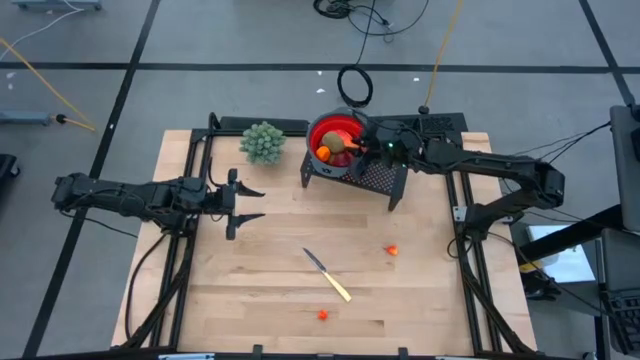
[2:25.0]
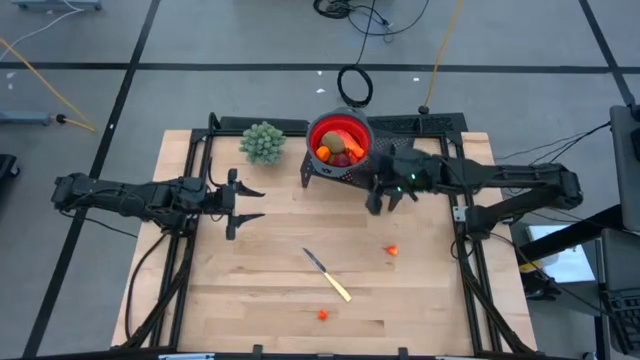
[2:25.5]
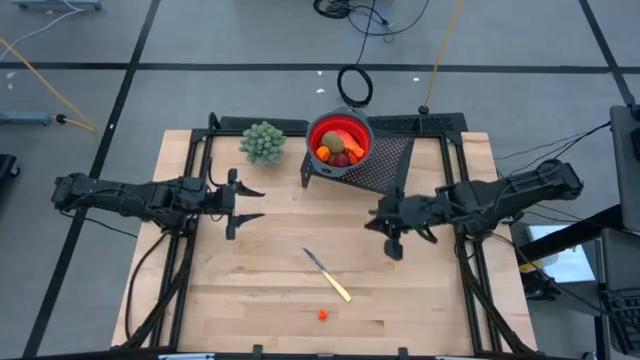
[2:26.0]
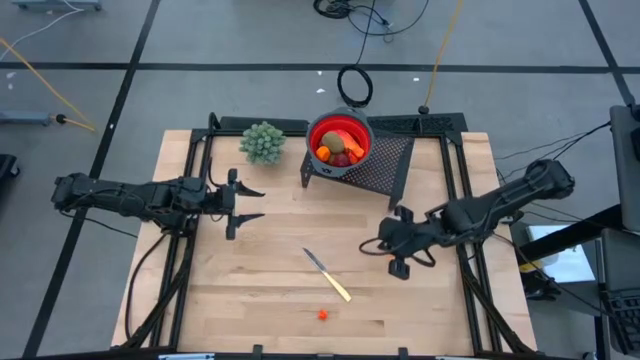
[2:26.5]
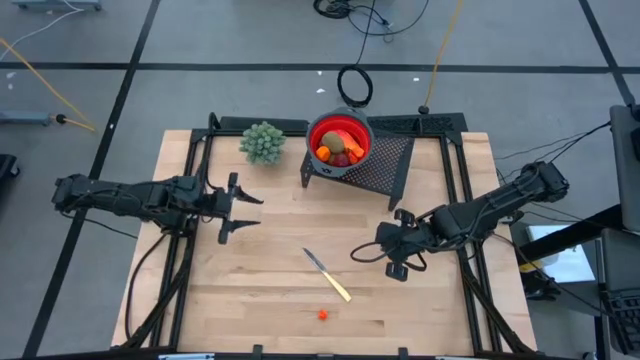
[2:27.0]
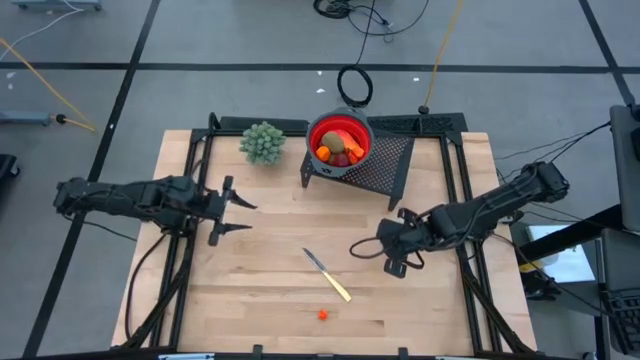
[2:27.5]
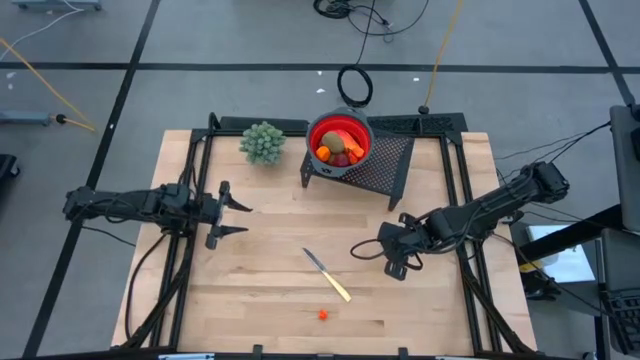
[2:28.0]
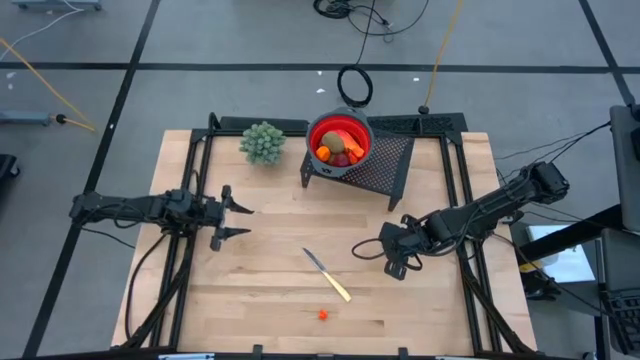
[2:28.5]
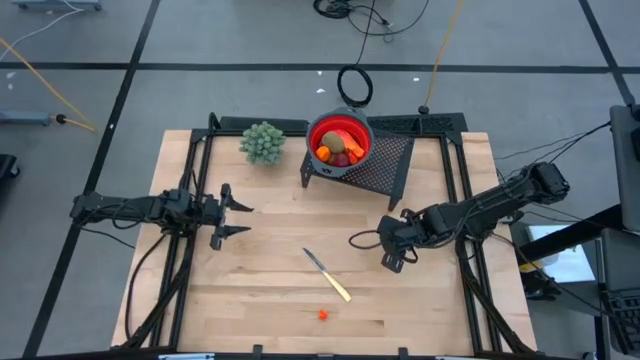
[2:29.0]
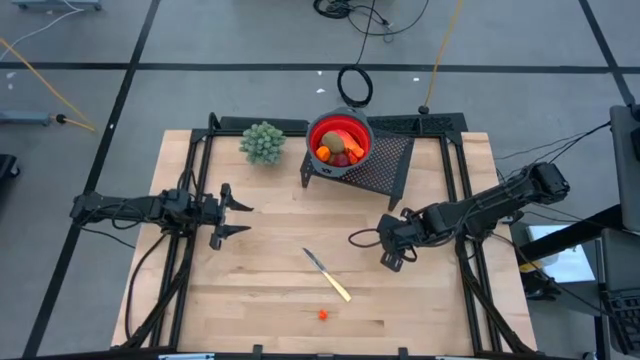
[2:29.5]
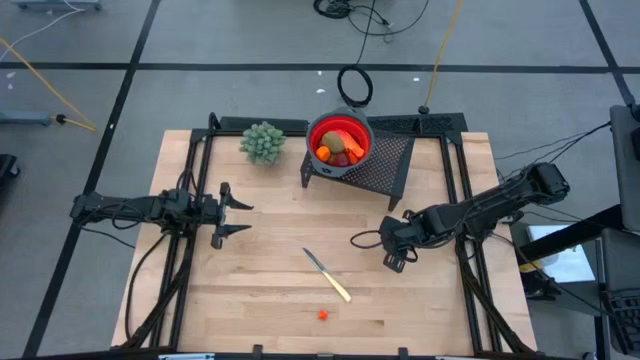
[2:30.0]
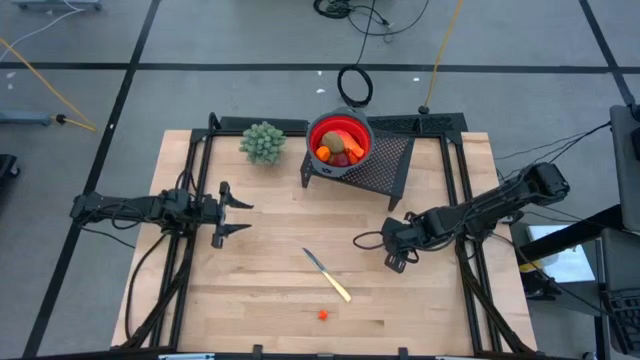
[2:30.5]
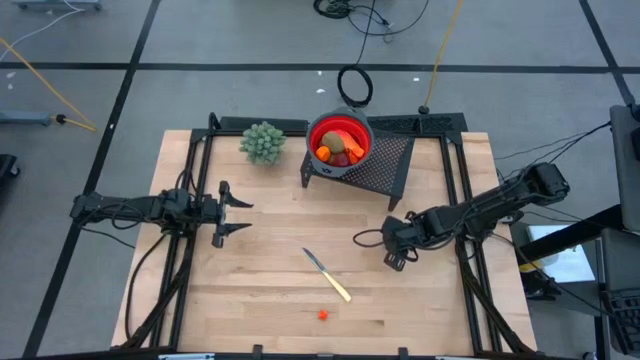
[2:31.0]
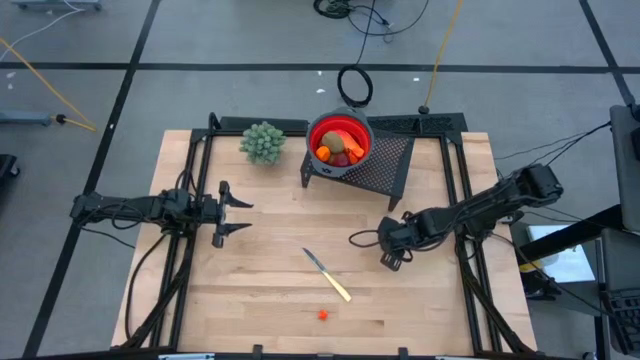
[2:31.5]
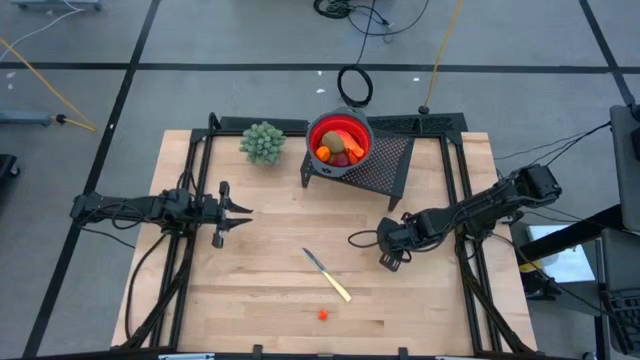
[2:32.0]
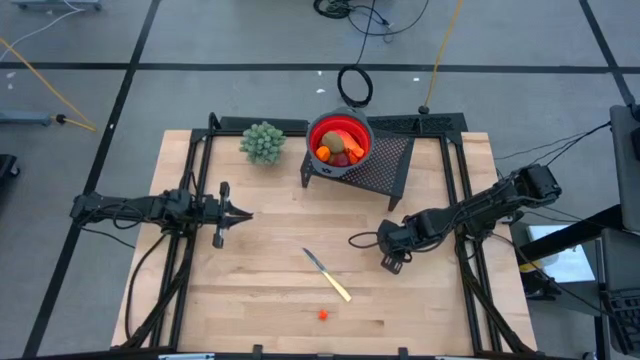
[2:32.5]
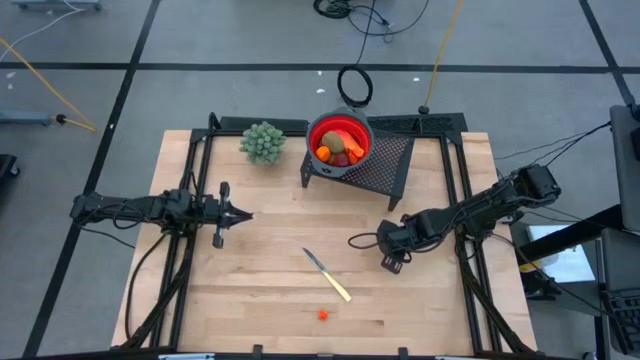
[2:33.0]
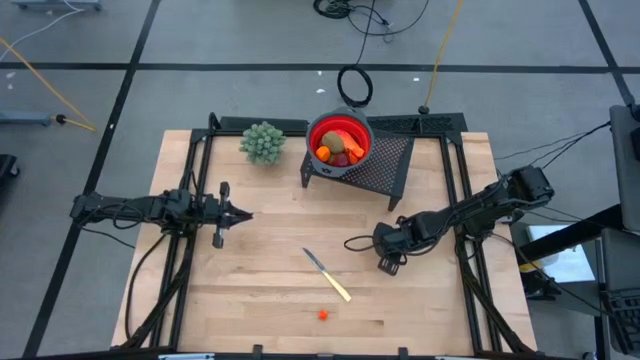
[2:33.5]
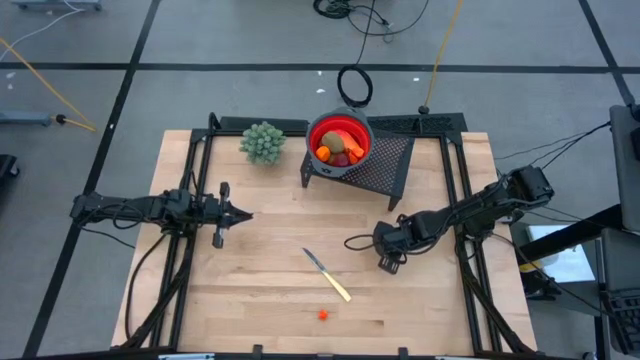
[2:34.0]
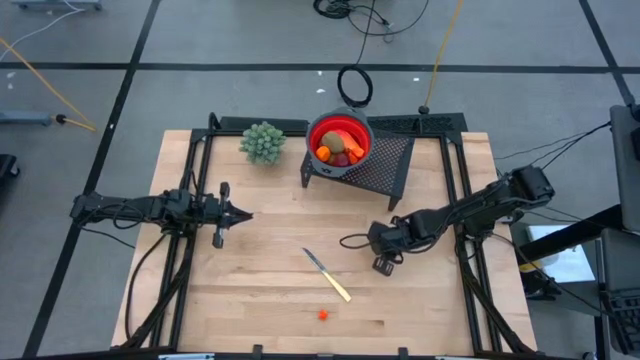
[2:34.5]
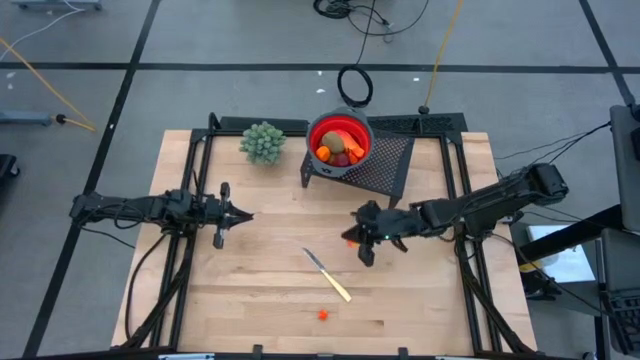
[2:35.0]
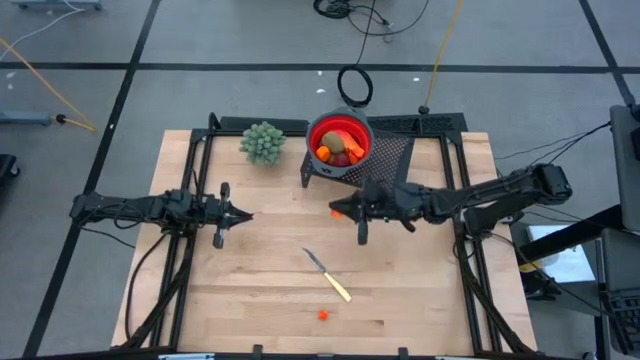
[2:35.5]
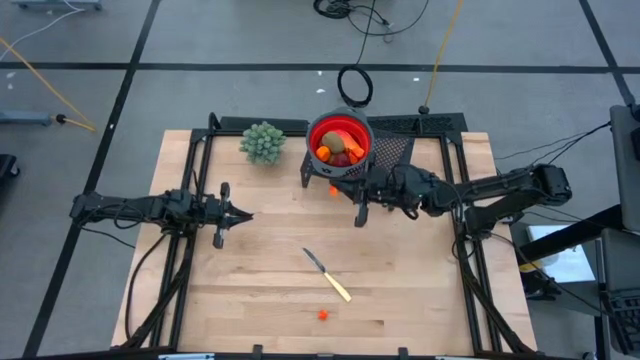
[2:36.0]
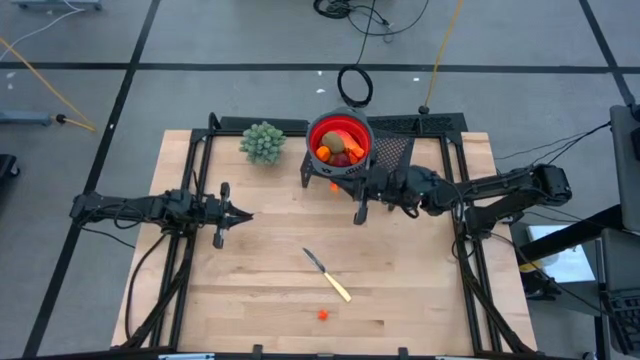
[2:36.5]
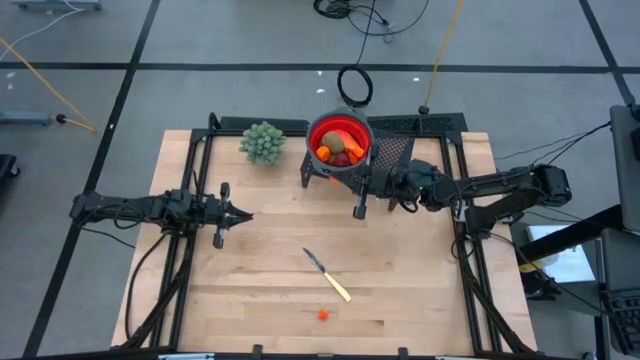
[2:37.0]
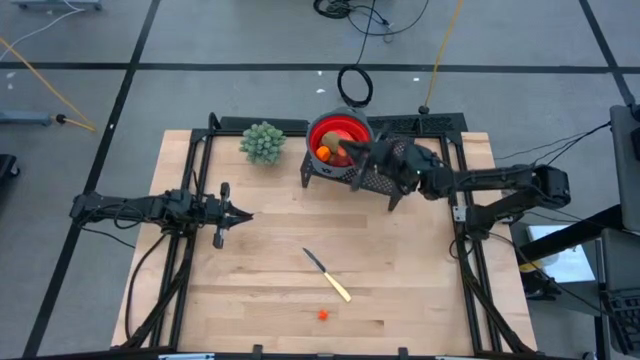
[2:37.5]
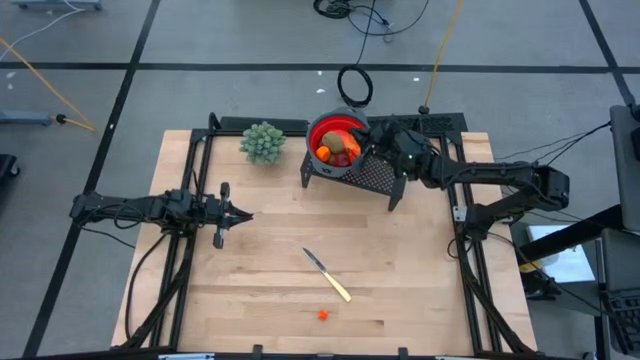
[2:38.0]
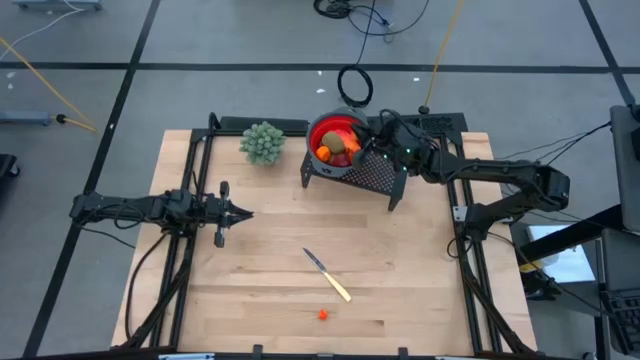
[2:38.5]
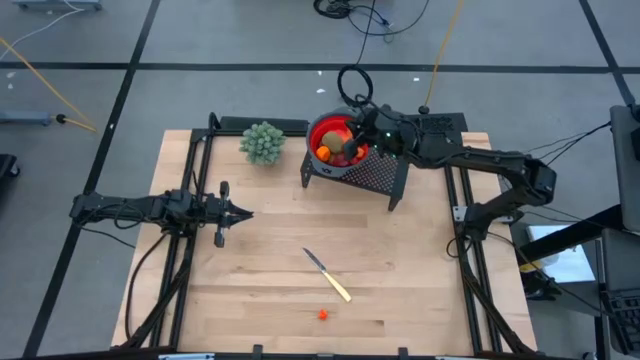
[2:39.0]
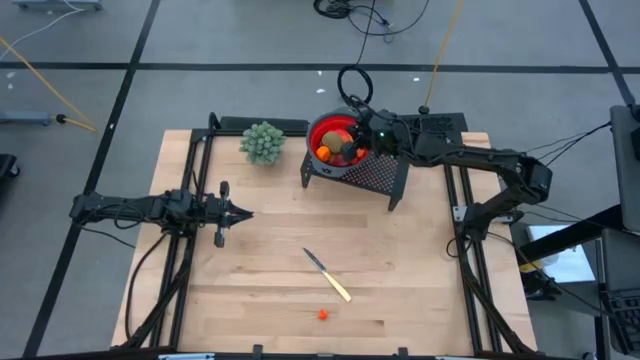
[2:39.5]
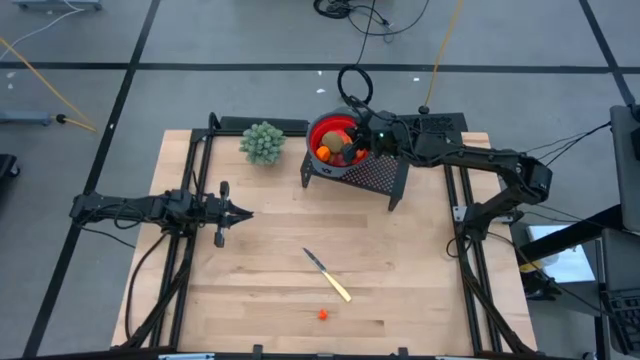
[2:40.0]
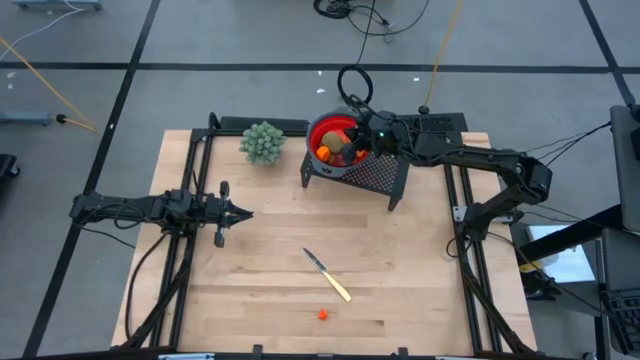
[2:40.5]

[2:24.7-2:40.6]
Task: Pick & Place Fruit
Put the yellow pear into the red strainer bowl on the shelf

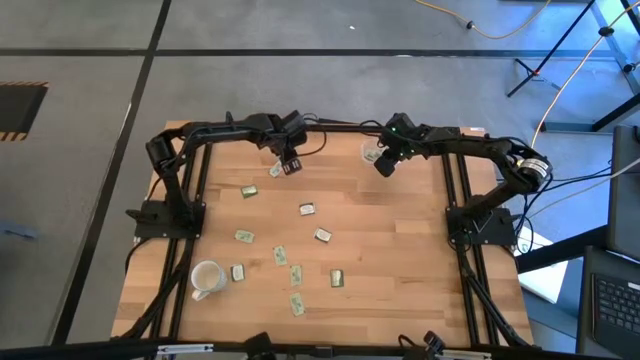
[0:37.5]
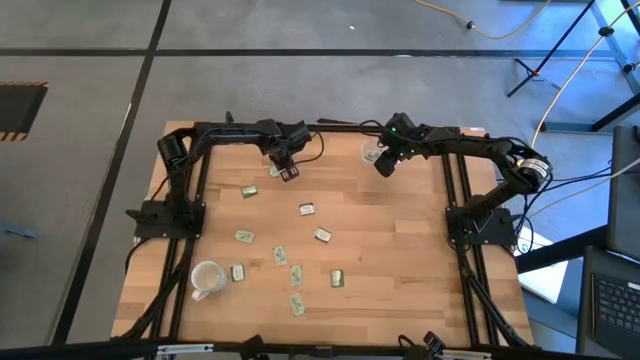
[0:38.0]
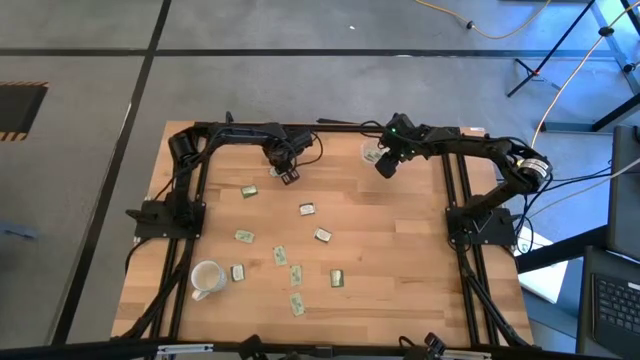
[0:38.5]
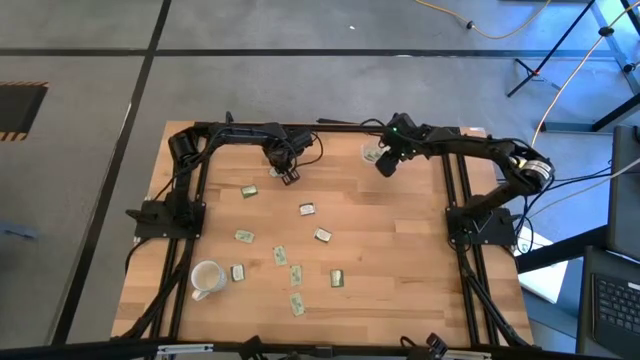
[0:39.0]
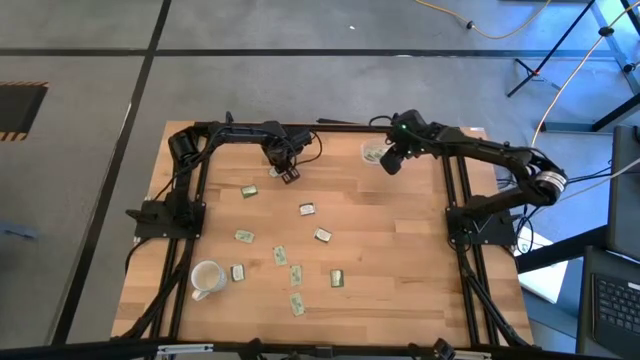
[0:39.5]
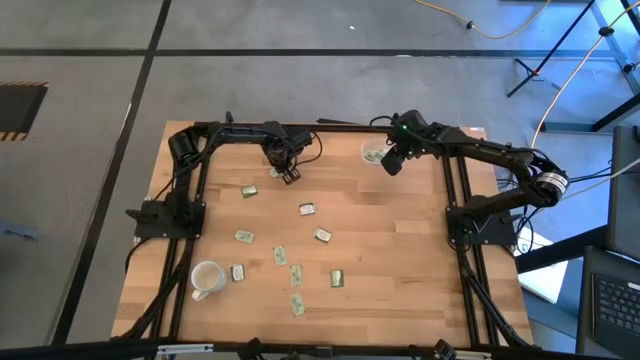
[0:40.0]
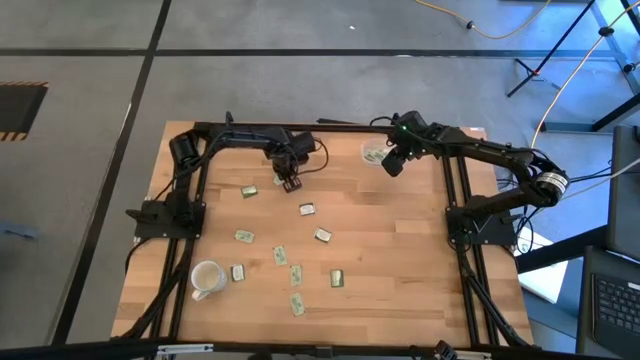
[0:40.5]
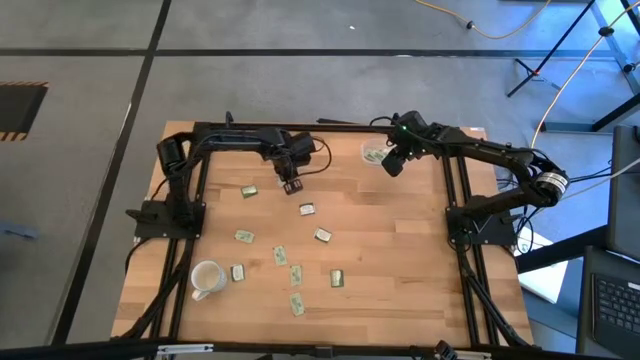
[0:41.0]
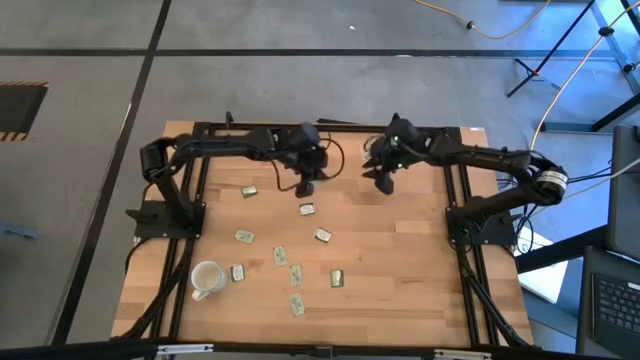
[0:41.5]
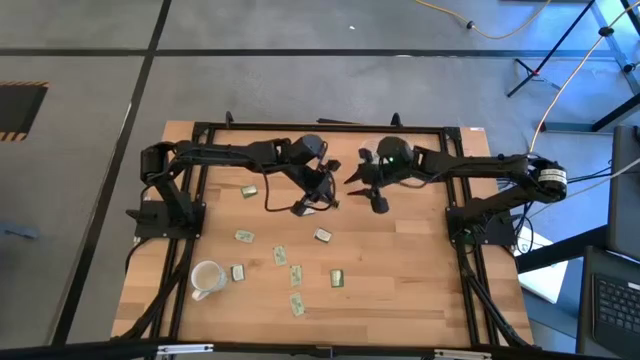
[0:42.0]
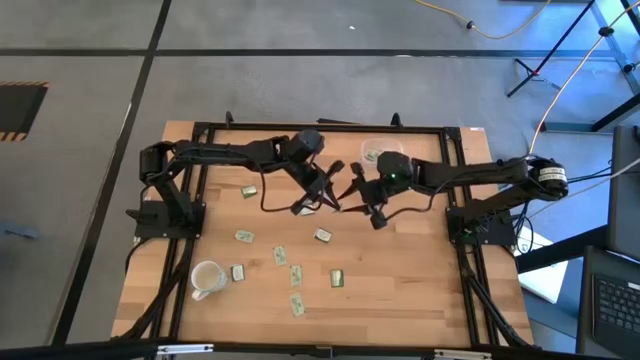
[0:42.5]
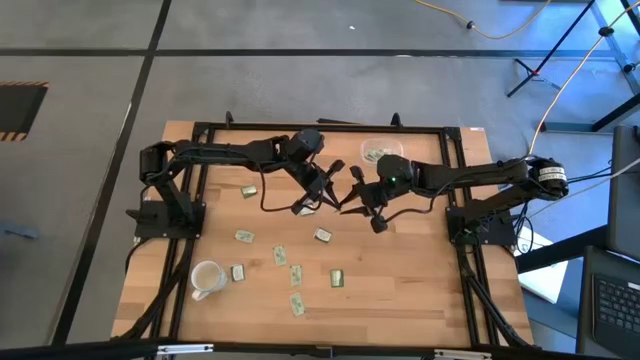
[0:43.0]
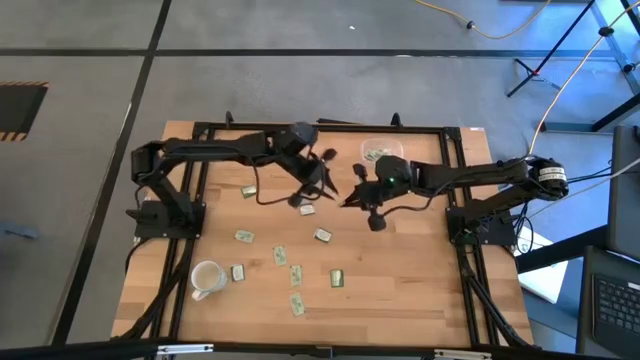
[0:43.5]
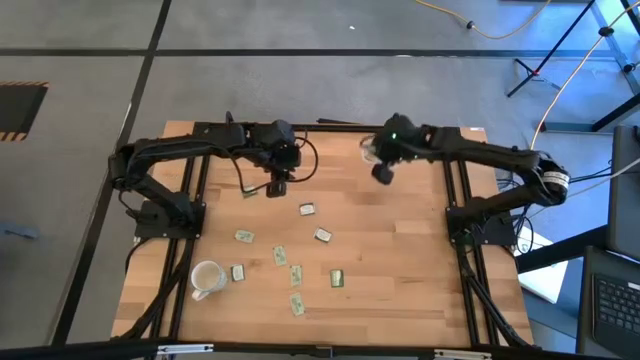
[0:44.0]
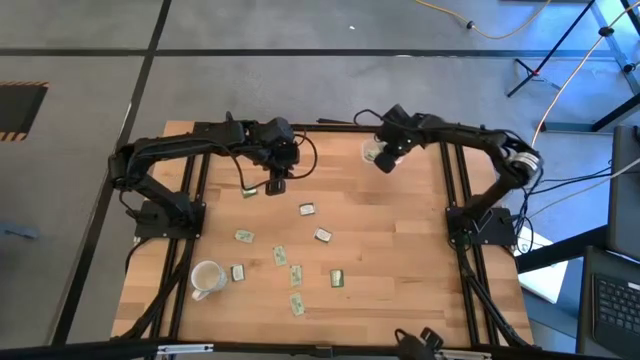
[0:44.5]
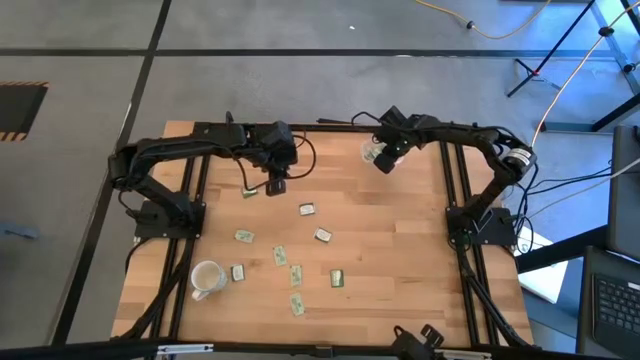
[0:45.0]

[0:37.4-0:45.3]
Task: Pick and place Stevia / Truvia into bins
Put the green stevia packet into the transparent container
